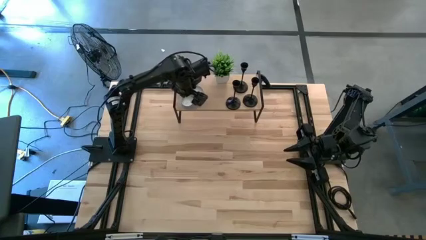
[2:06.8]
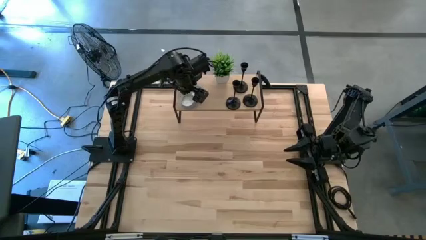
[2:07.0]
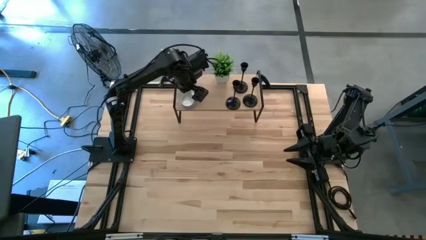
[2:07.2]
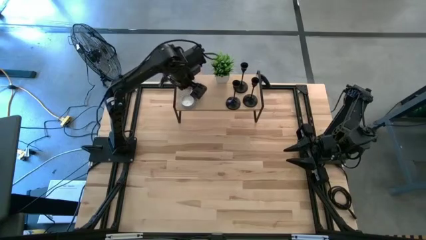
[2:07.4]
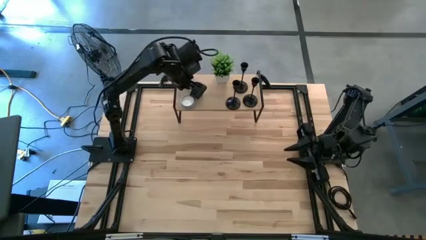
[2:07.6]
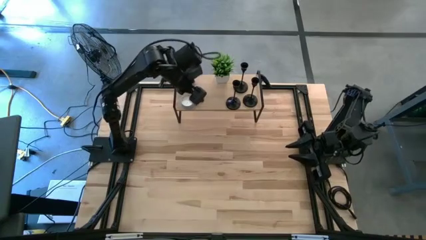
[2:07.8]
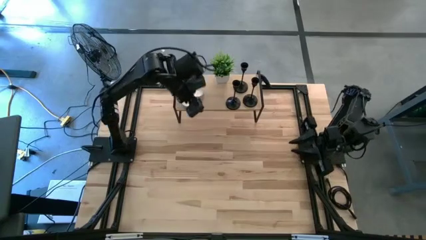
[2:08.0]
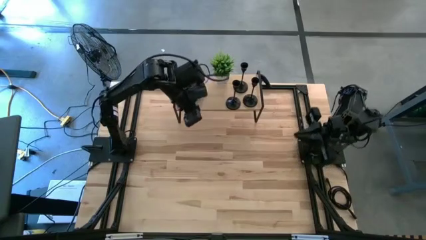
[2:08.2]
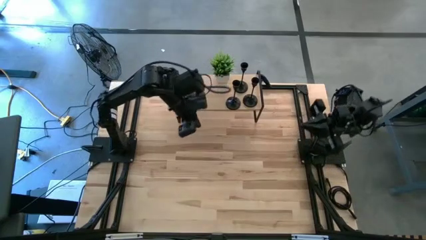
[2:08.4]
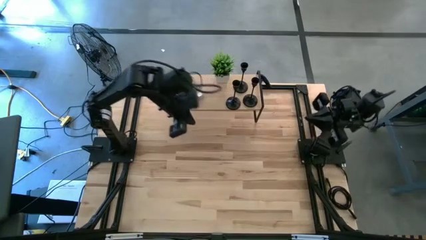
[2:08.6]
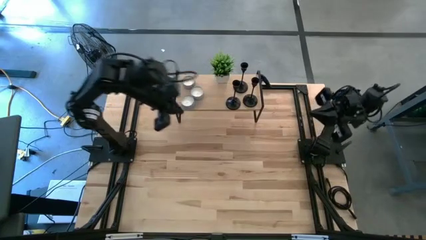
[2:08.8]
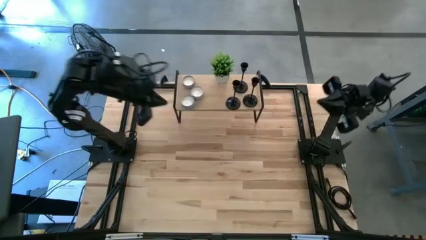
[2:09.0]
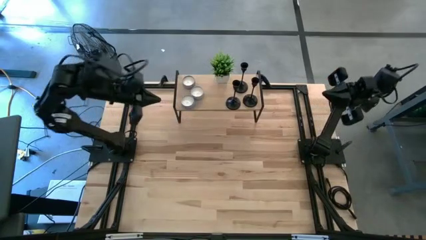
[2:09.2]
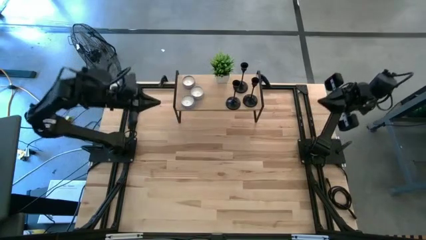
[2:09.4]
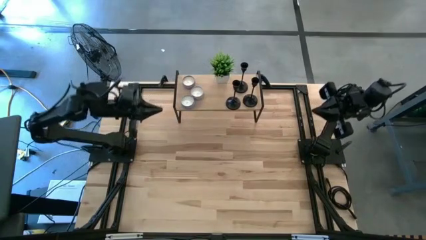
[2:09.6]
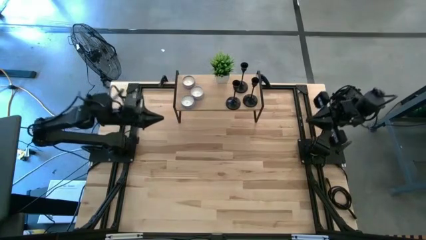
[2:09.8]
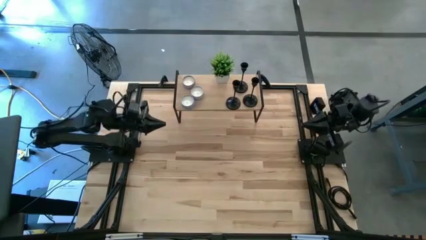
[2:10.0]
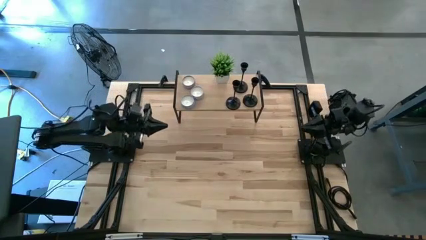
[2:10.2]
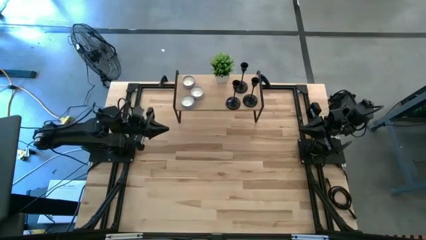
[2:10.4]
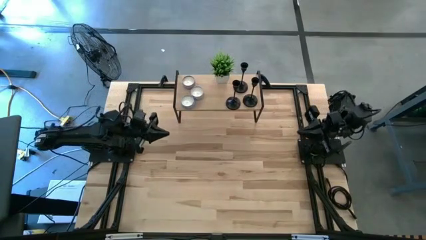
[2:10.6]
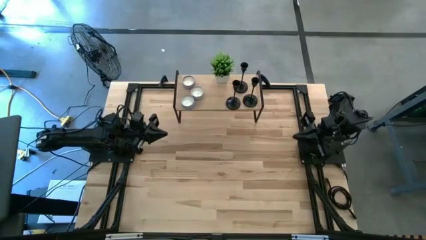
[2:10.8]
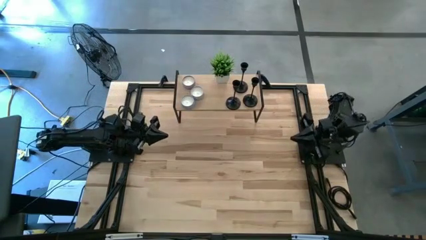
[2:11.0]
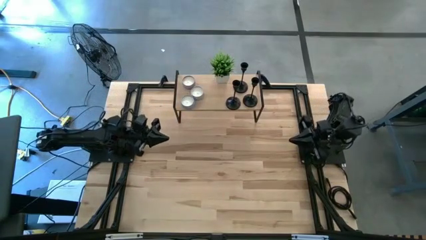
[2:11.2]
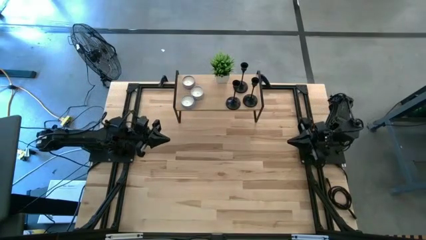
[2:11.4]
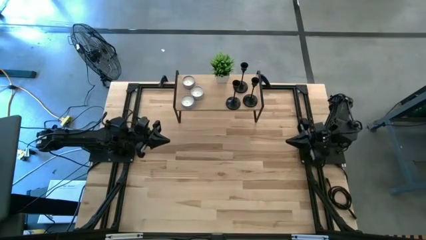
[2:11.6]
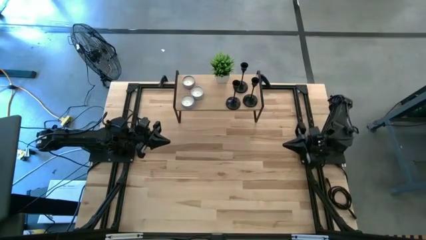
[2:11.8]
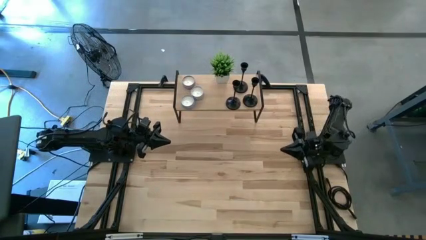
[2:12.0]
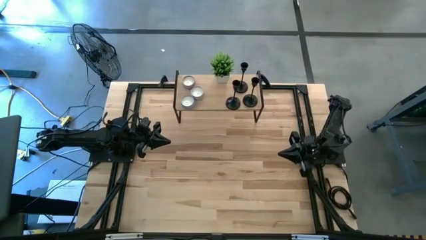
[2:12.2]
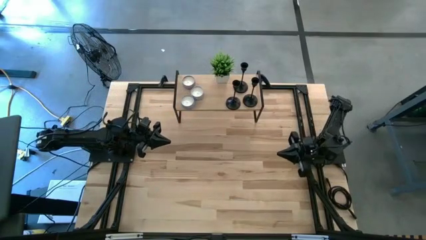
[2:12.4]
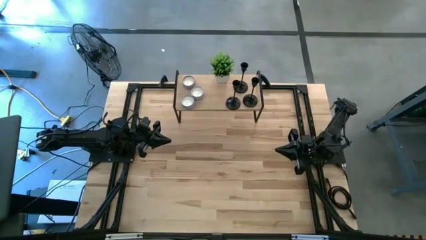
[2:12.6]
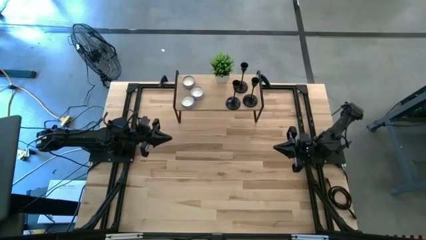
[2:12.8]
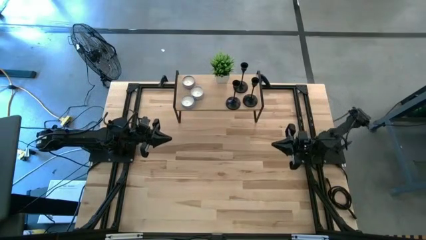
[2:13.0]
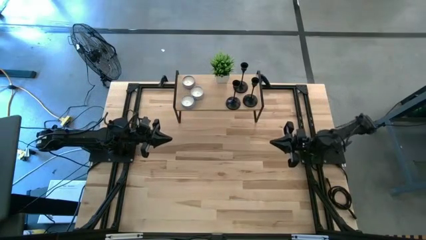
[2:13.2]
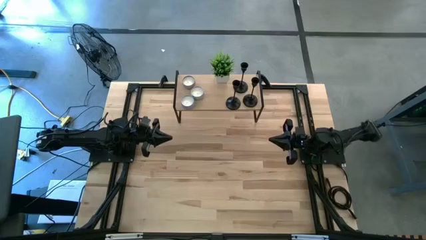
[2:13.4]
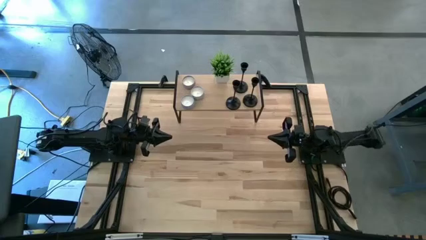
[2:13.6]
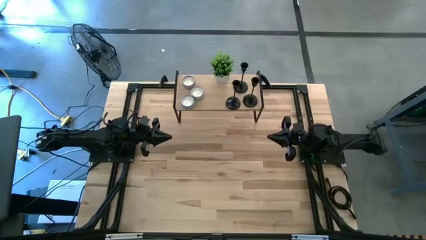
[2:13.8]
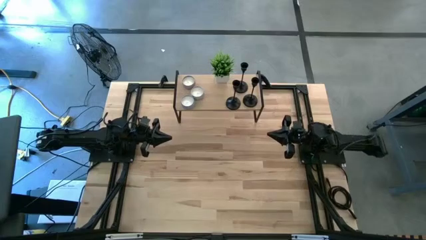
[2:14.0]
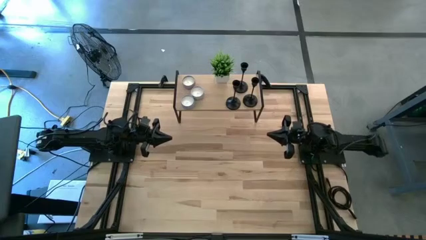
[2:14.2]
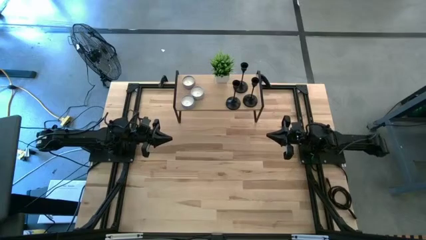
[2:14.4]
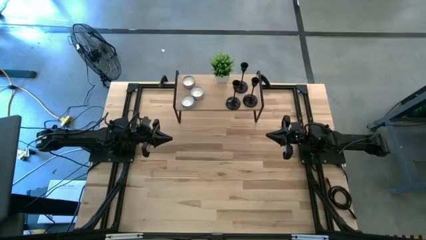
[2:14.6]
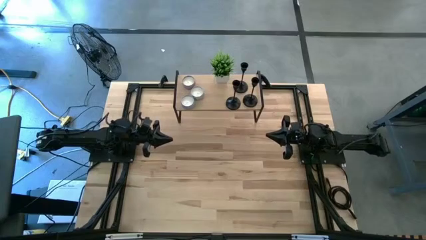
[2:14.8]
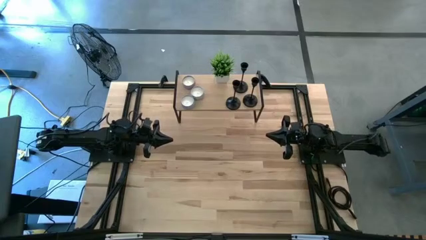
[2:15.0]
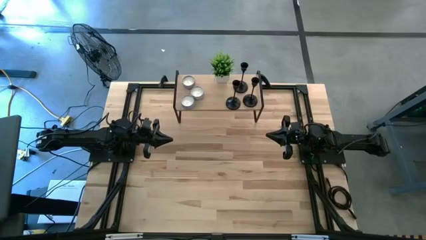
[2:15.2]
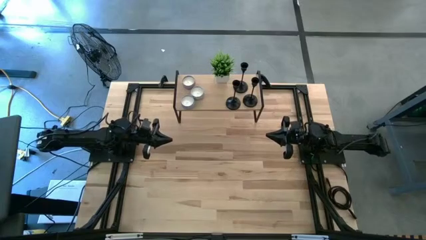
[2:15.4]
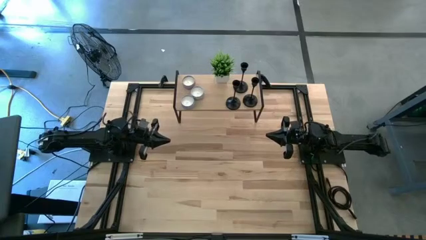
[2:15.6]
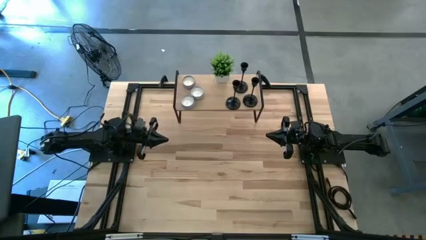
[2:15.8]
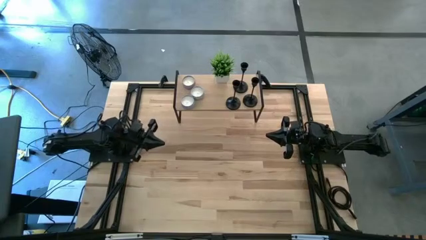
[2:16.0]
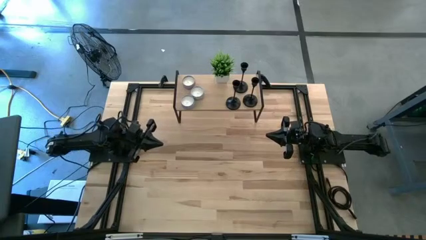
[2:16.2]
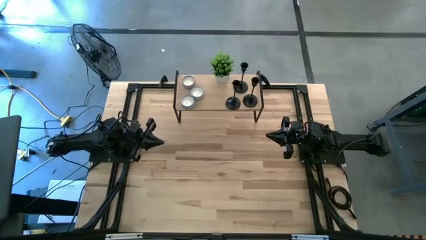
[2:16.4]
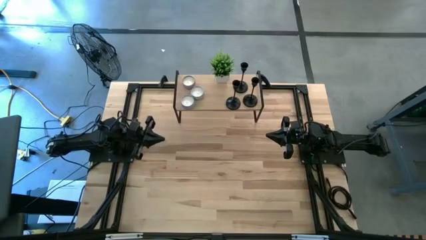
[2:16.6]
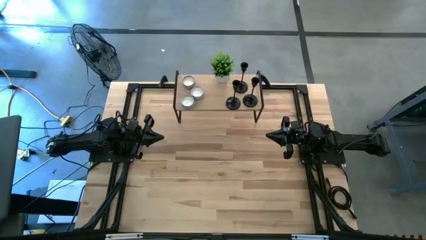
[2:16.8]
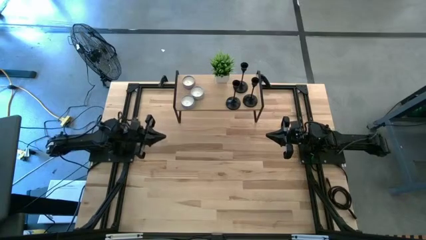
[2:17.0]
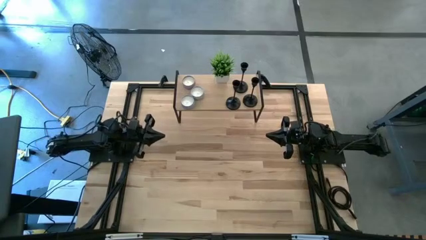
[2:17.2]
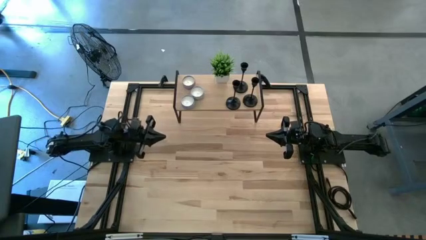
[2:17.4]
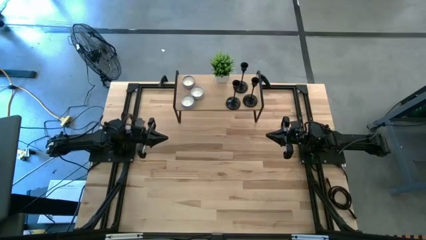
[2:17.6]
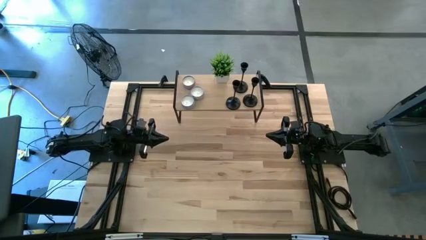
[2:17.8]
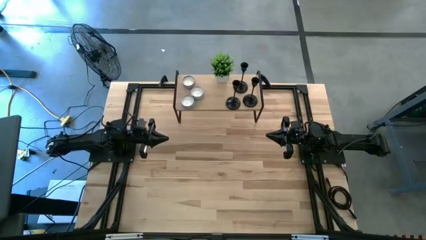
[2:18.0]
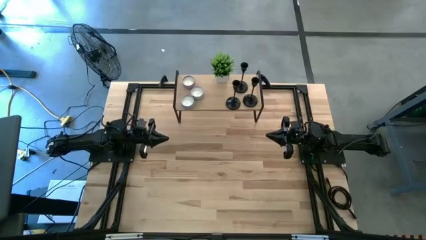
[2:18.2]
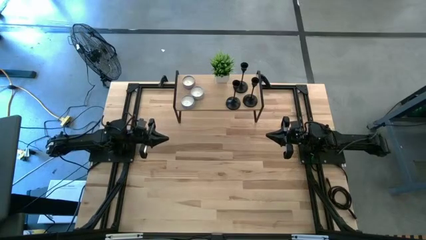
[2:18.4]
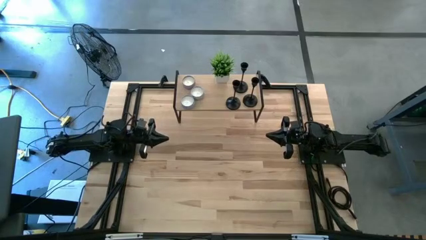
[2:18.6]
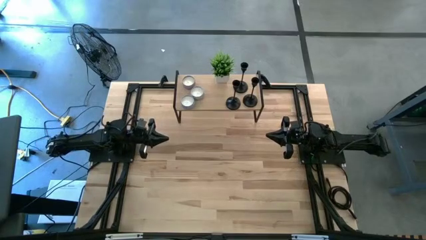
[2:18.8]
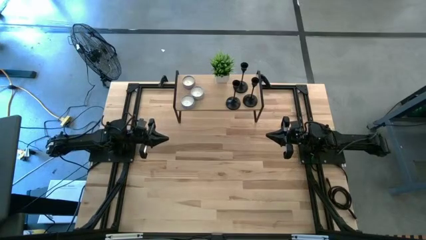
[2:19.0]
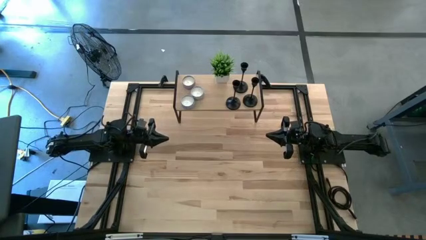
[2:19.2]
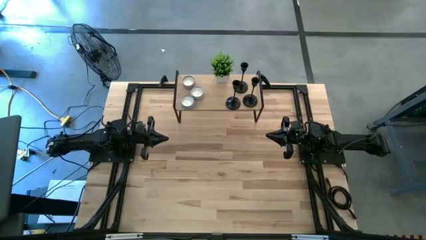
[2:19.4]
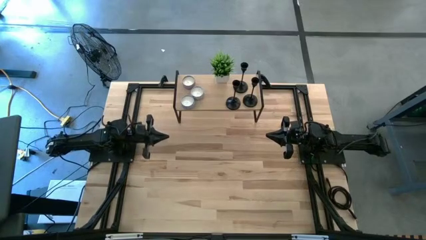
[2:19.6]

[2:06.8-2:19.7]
Task: Pick & Place candle stick holders
Return to Home Position

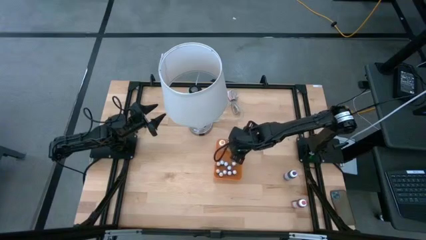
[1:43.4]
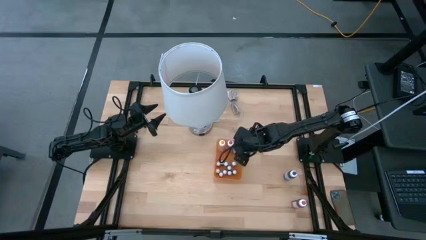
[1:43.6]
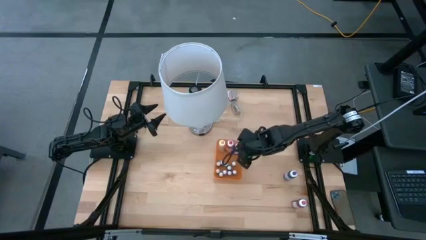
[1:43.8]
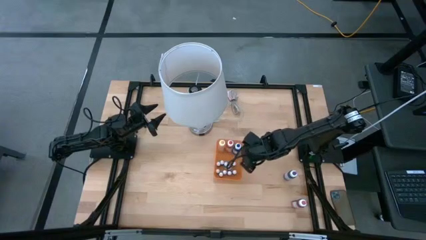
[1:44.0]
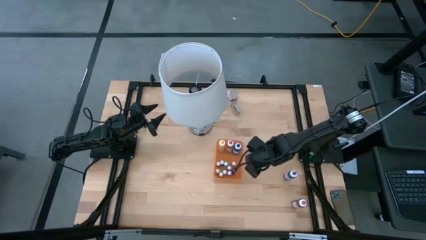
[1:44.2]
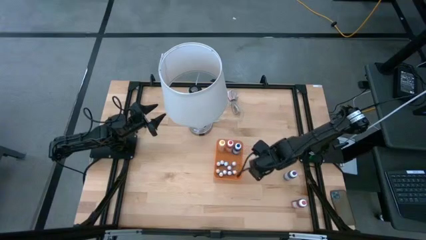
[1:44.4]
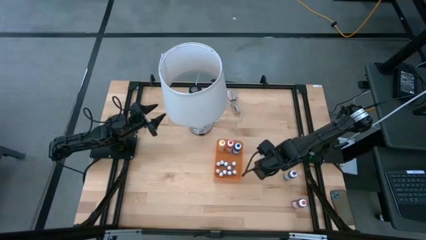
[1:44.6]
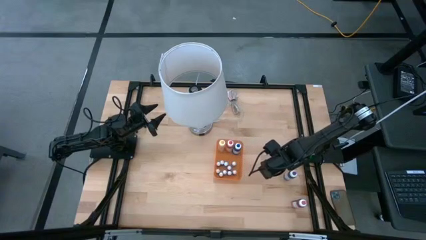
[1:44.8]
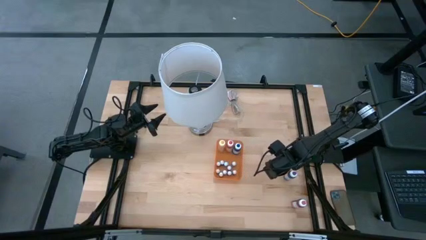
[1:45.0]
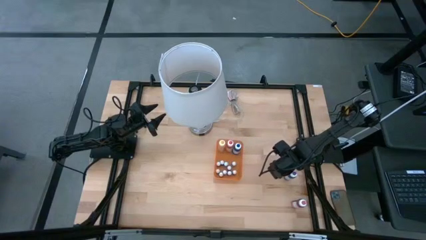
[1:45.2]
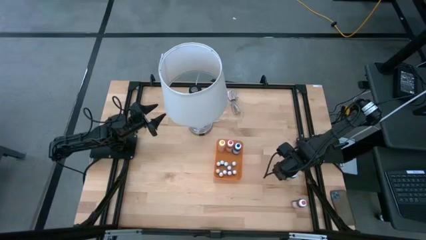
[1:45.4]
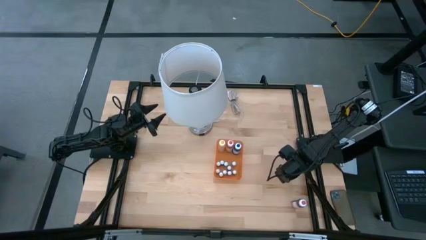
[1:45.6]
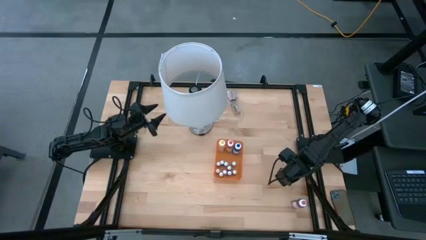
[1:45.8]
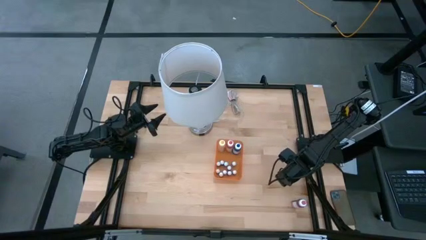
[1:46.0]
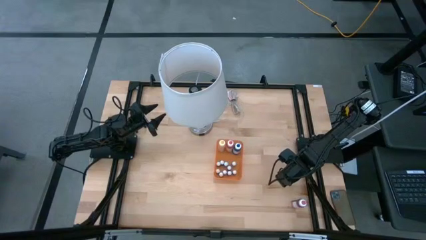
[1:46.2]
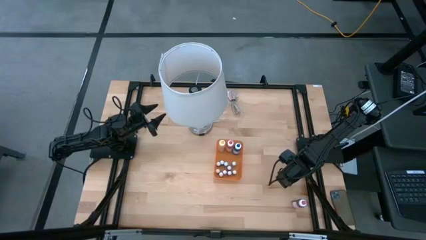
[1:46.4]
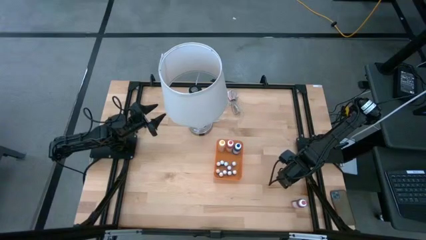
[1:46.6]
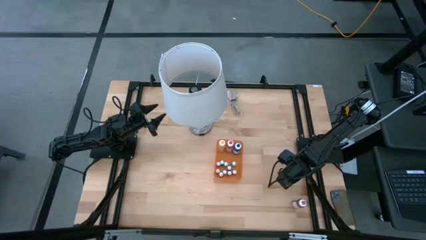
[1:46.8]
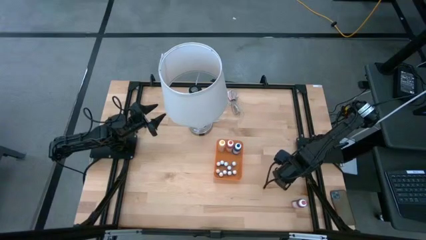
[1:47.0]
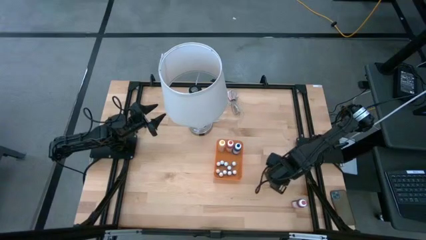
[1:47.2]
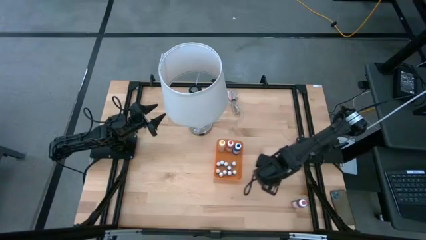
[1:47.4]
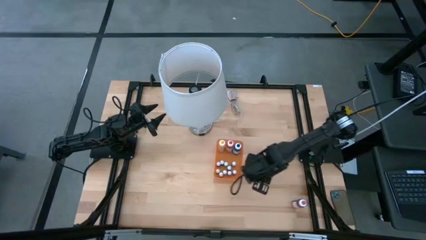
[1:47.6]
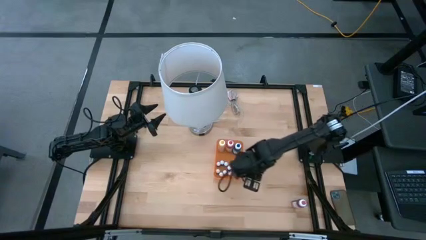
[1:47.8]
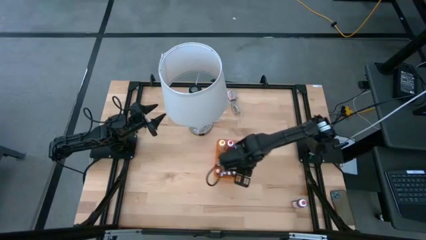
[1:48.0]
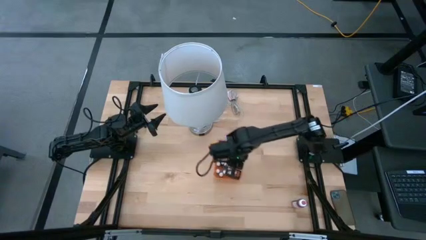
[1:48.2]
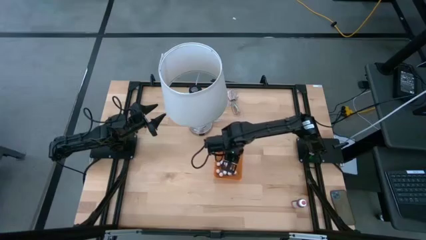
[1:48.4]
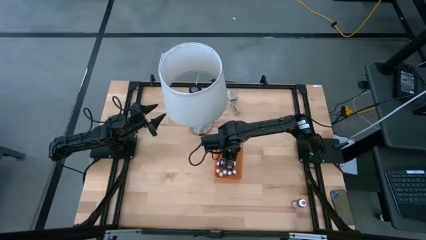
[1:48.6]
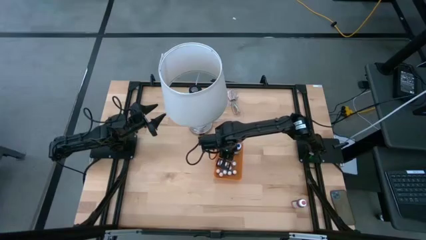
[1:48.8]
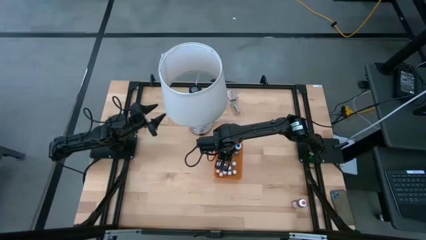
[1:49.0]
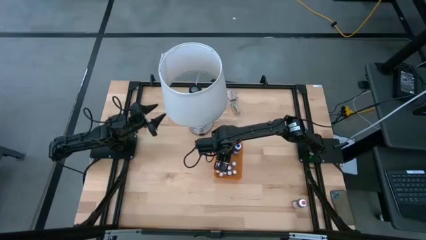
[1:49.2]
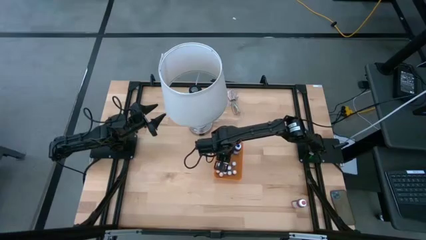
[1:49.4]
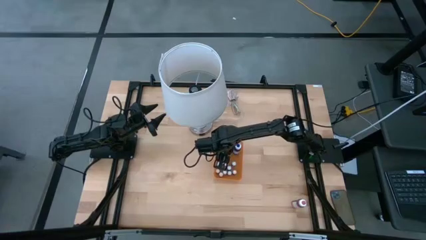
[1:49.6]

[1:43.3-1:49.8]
Task: Pick & Place food coloring
Put the big purple food coloring bottle into the bin
